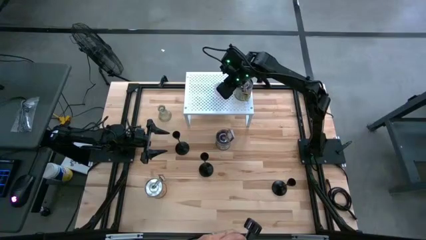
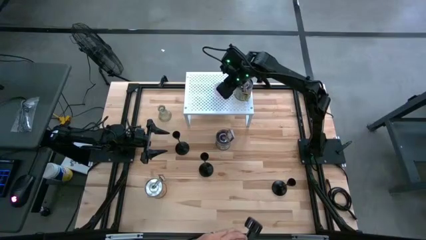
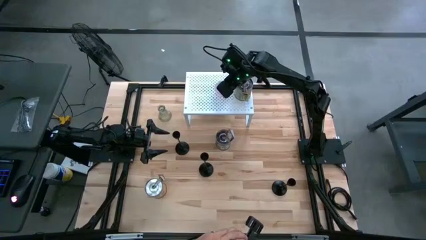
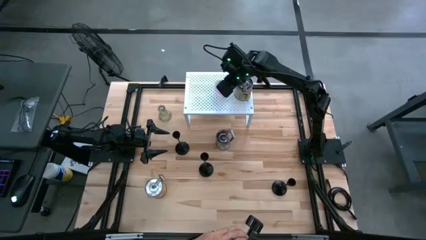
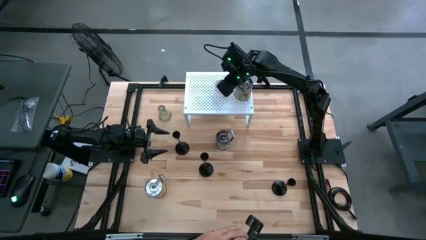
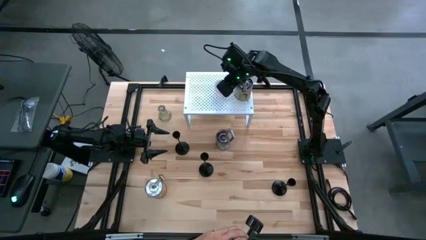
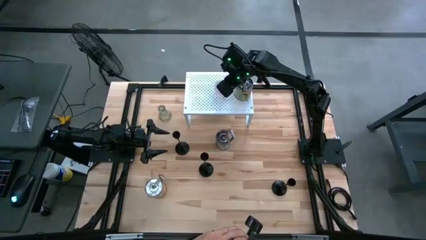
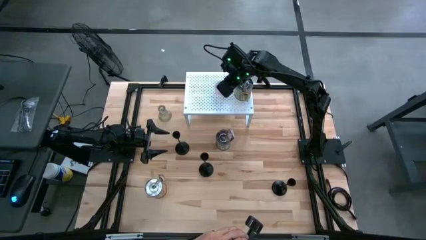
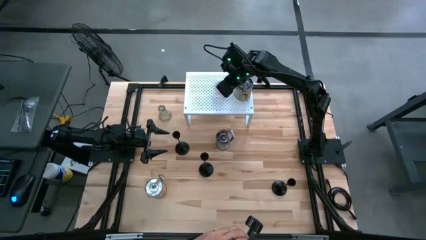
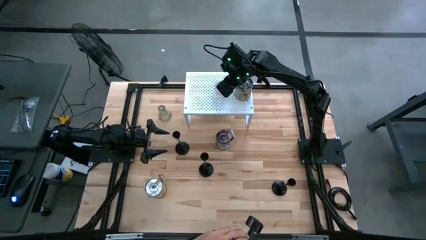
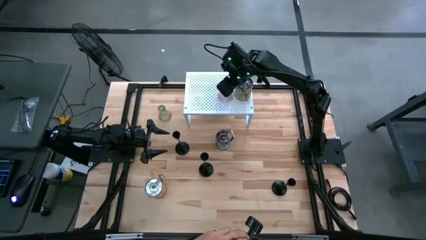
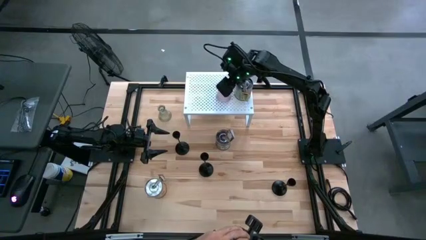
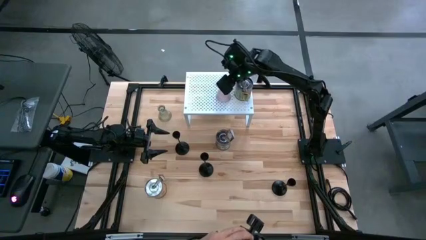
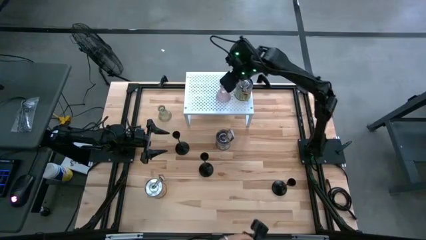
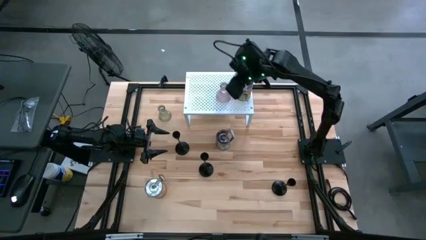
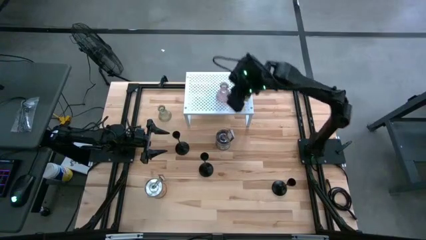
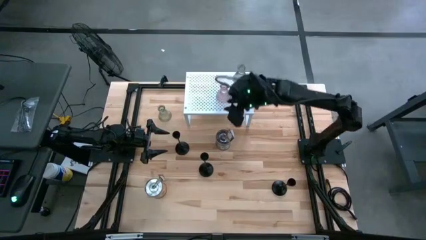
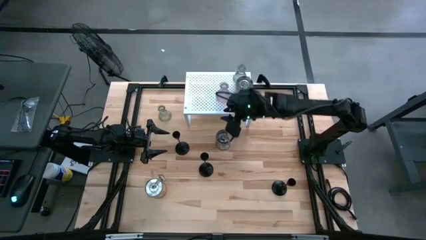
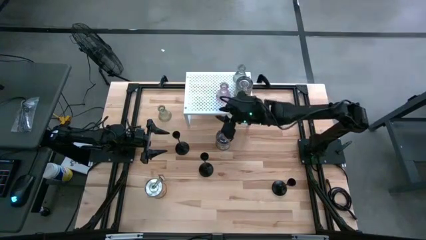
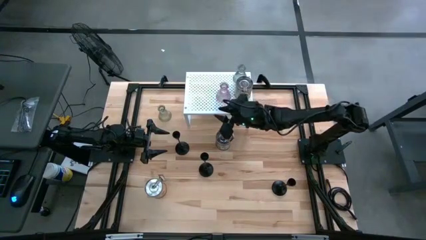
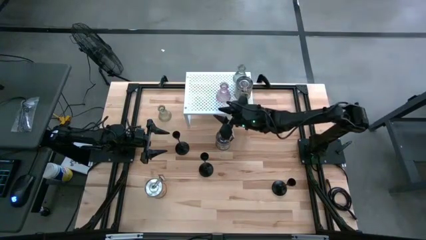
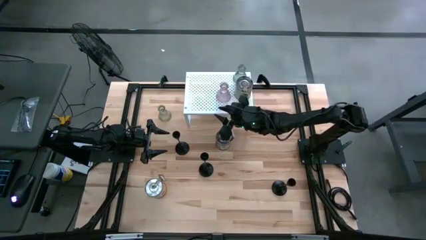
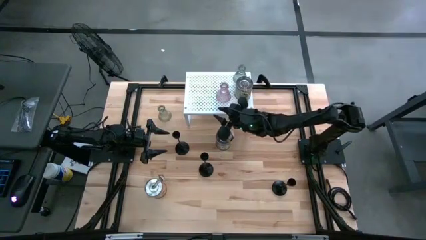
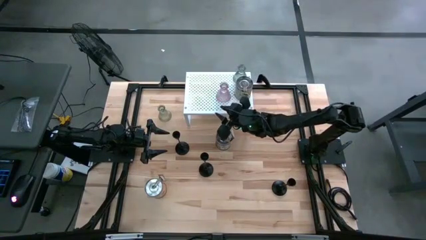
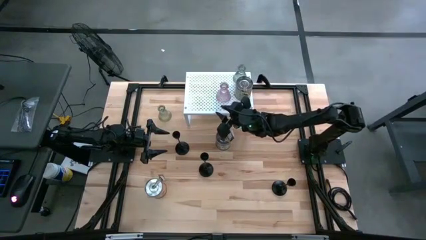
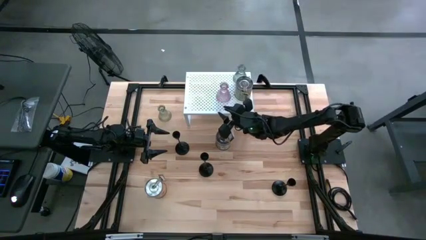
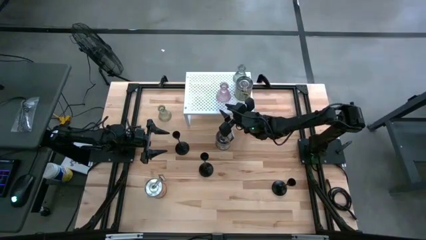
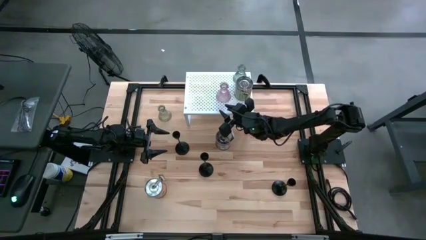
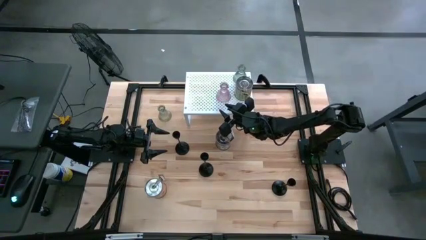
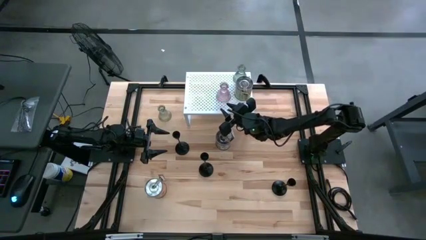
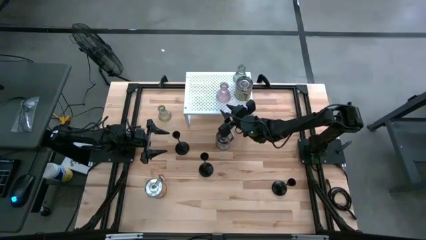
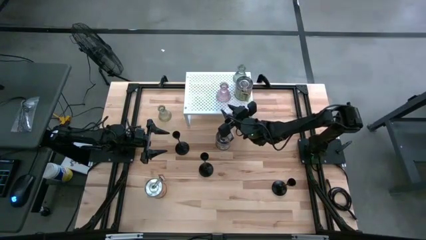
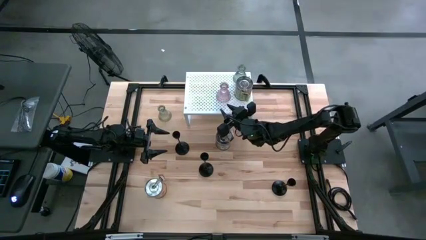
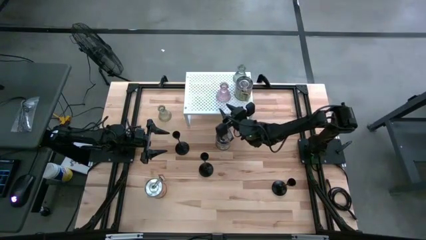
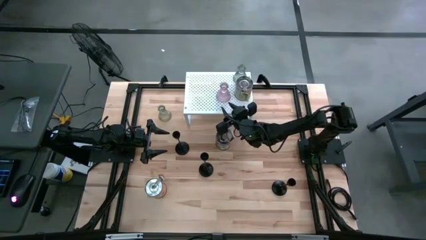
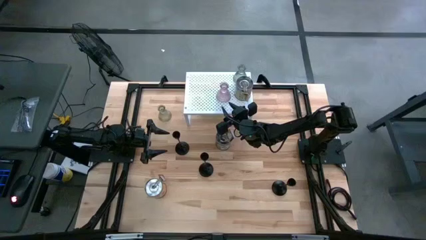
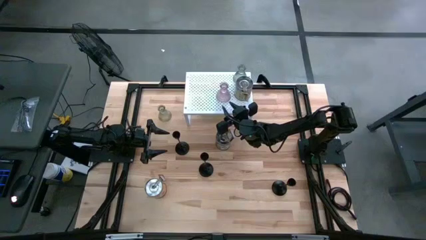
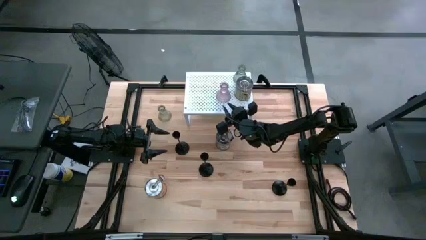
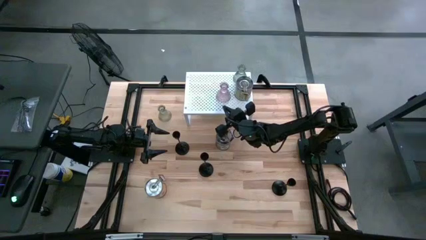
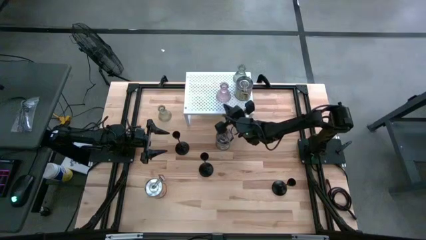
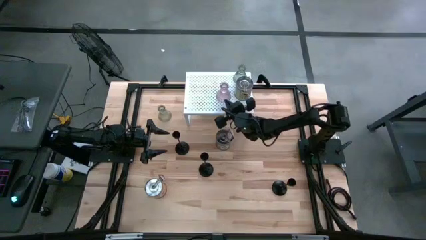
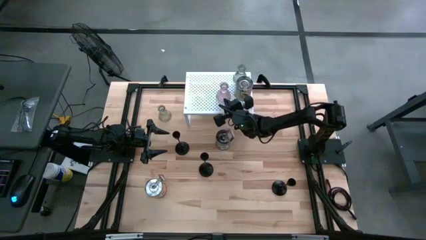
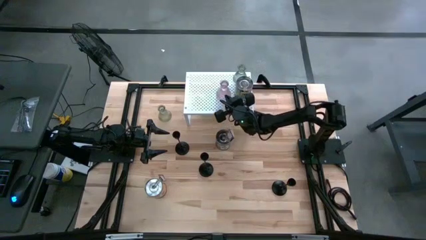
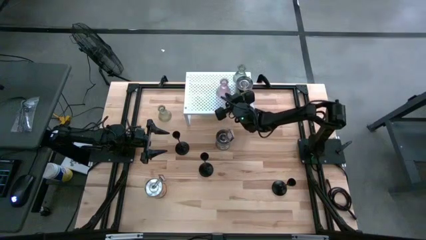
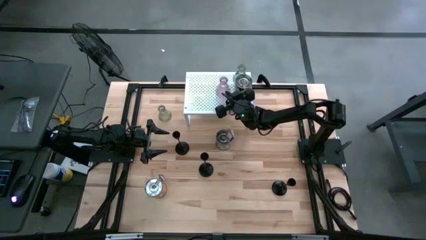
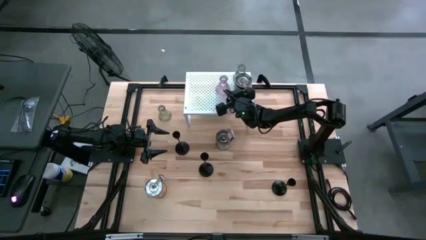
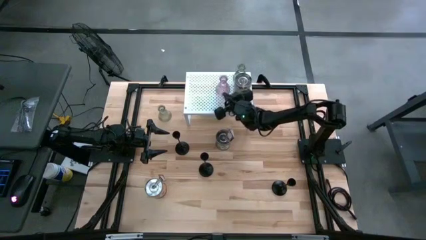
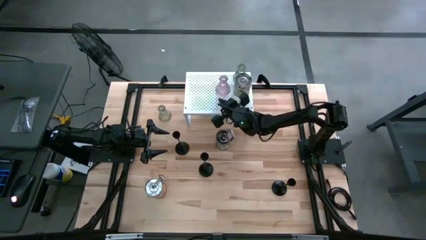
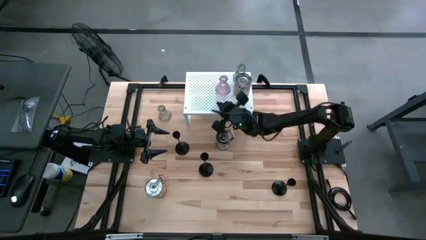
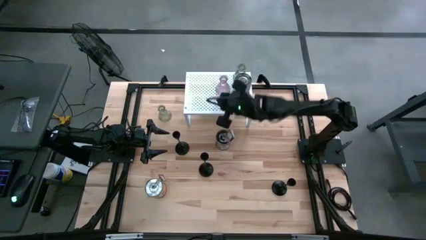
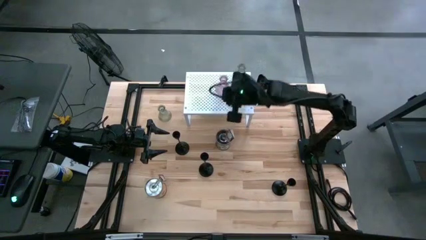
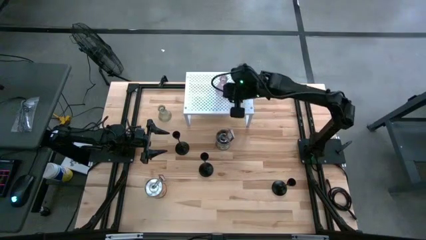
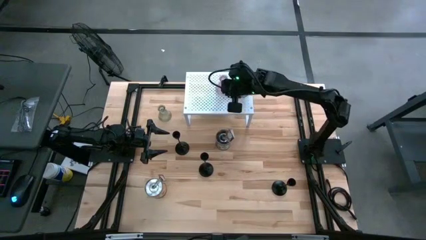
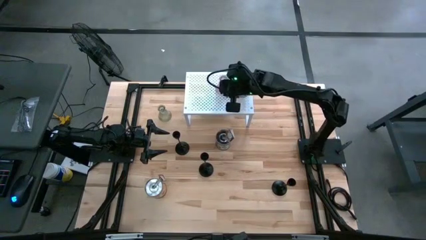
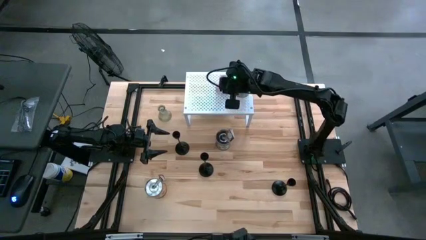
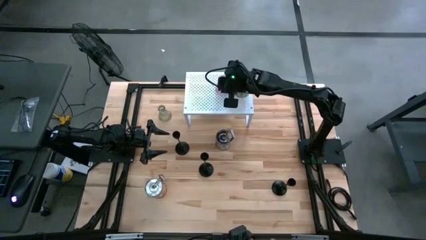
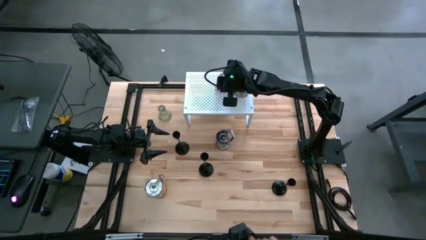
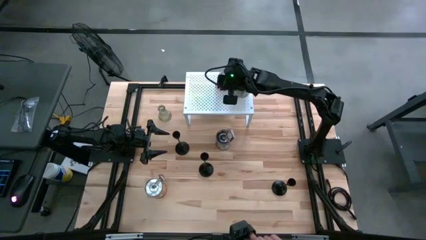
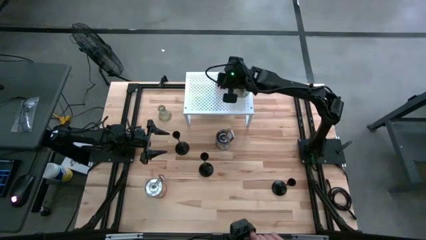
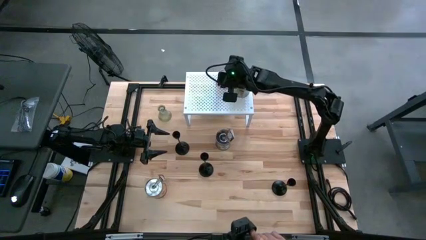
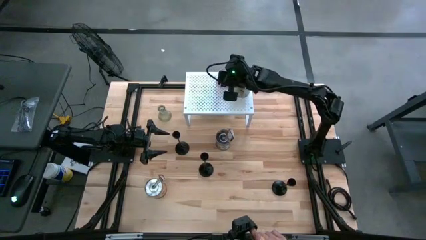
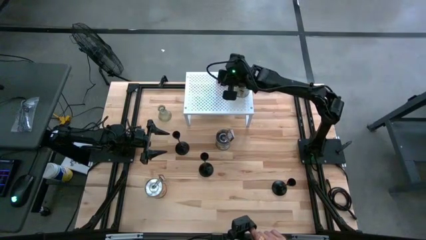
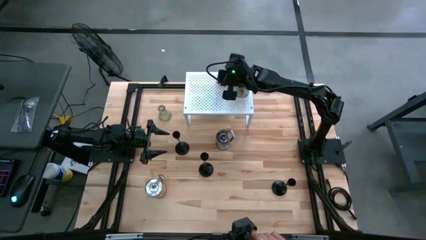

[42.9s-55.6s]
Task: Pick & Place candle stick holders
Put the pink glass candle holder on the shelf aligned with the other glass candle holder

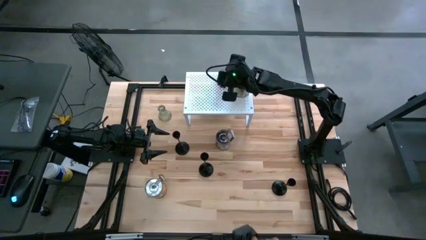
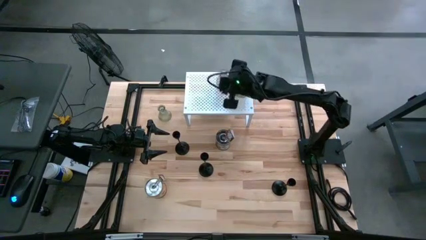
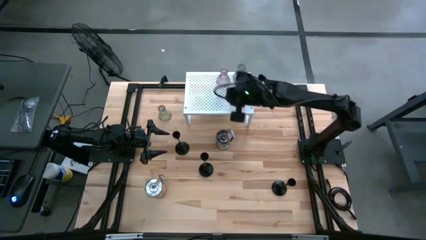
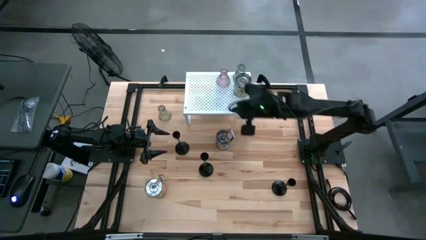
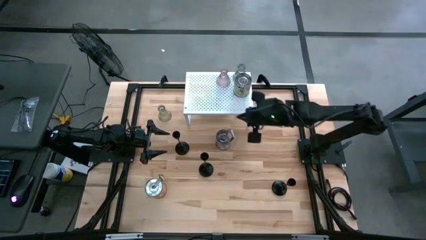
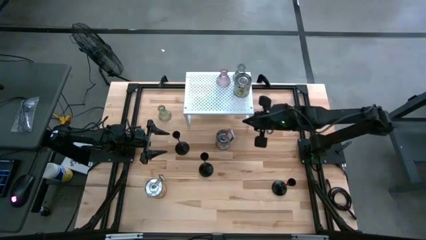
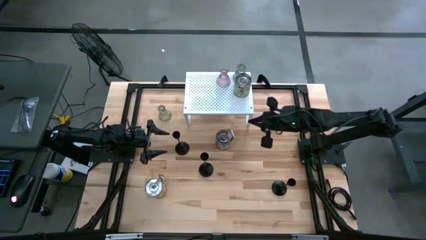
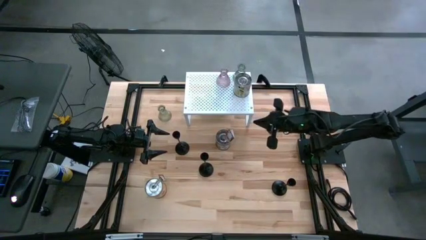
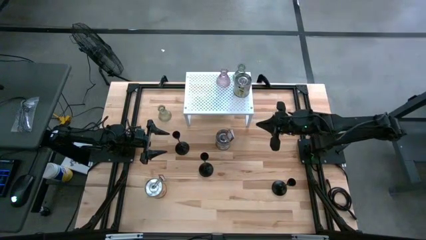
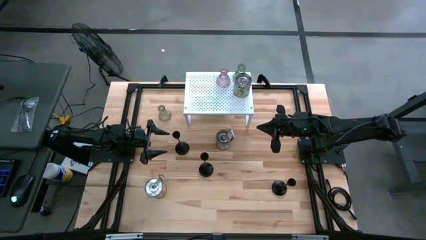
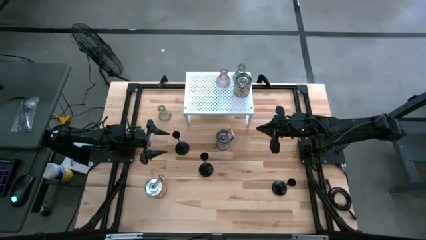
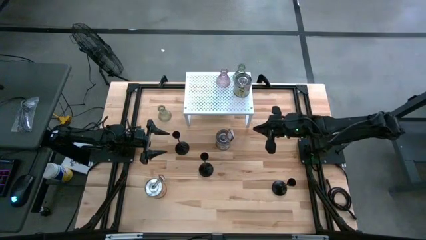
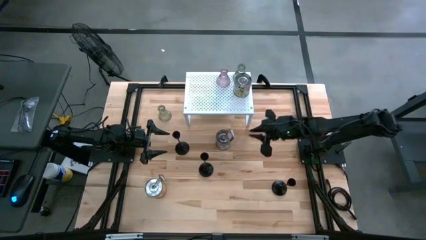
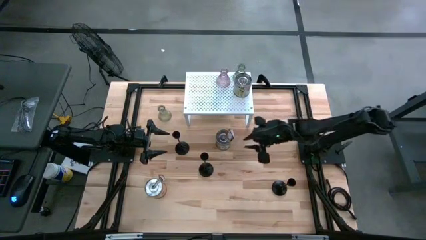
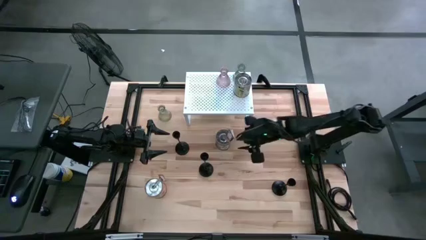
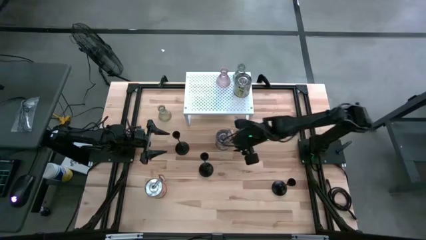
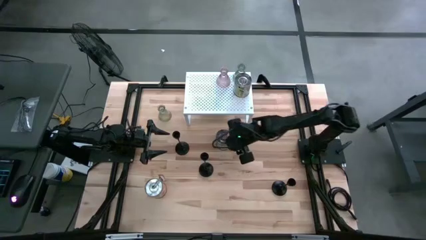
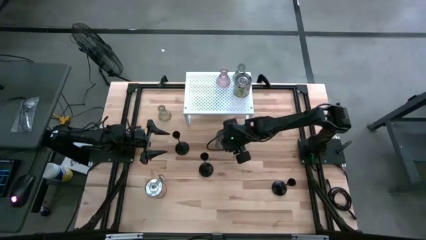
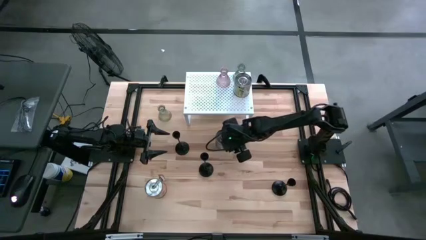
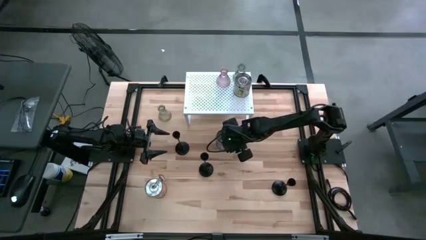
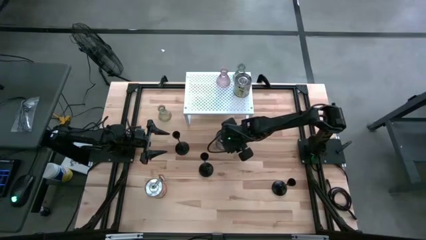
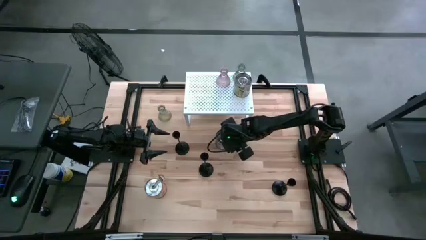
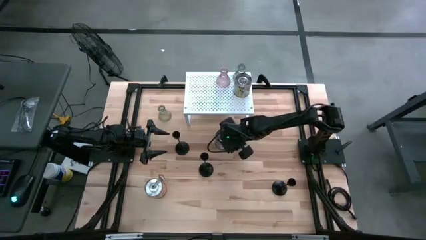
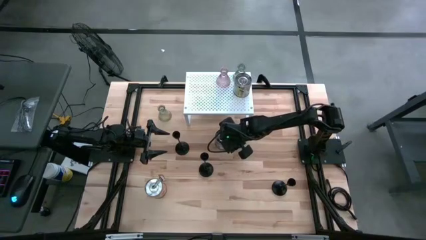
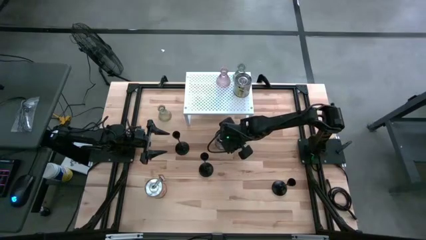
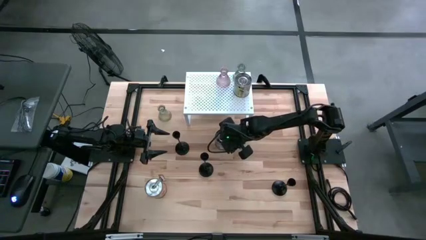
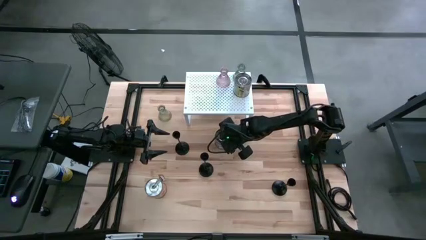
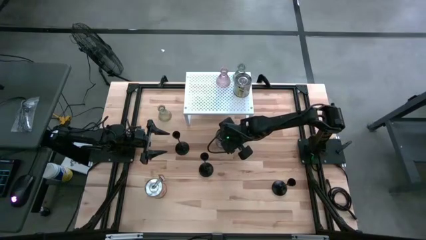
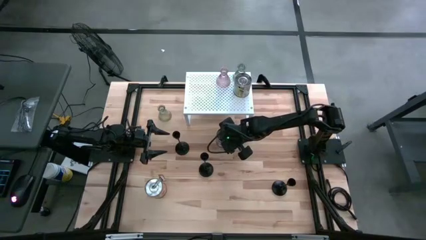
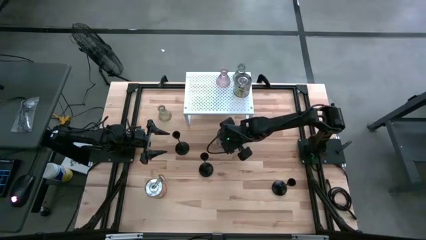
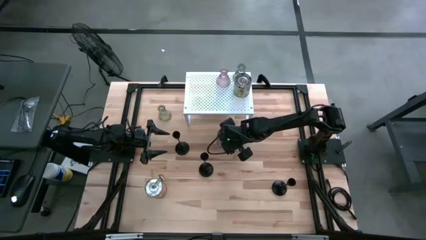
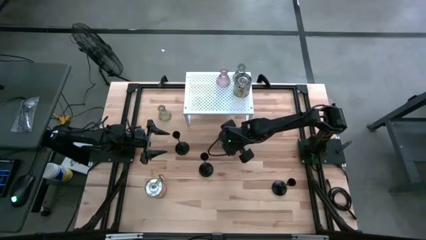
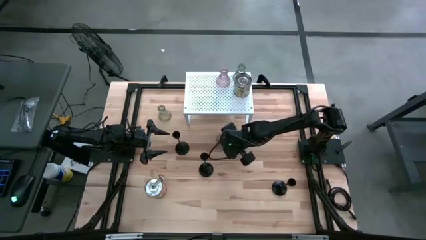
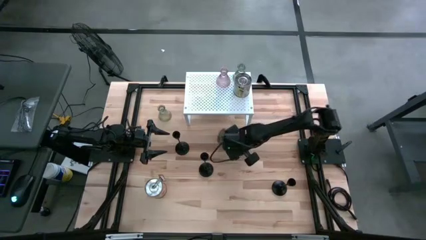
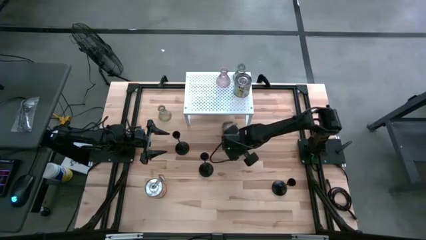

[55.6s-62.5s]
Put the brown scented candle on the shelf aligned with the other scented candle
